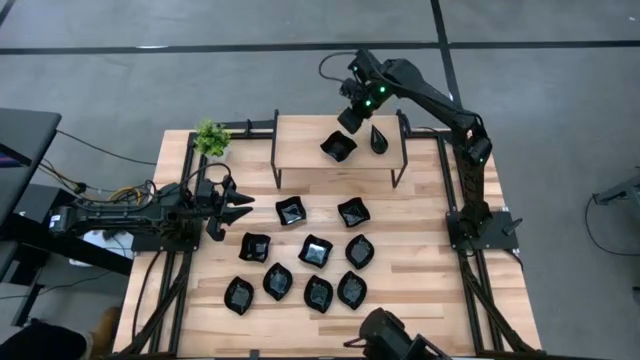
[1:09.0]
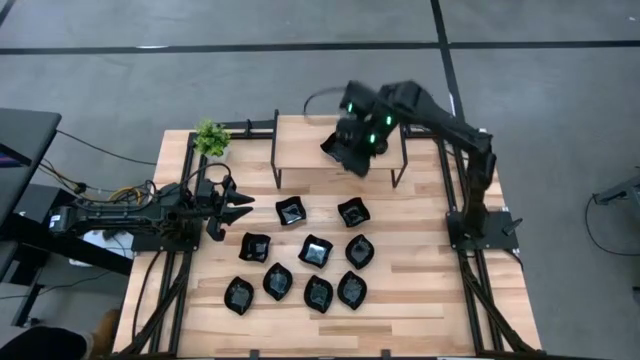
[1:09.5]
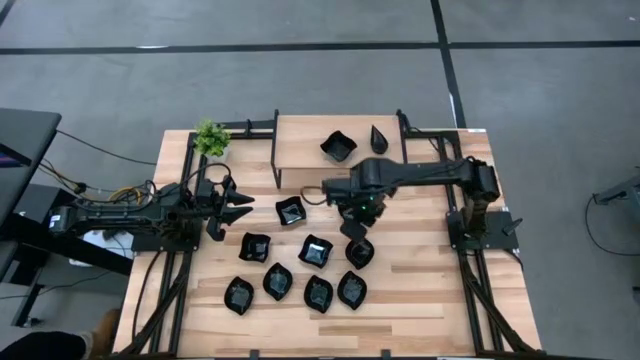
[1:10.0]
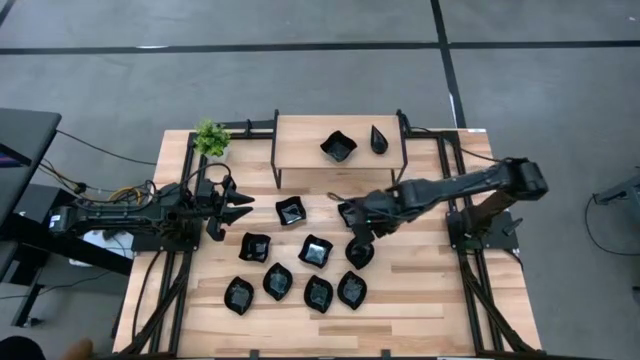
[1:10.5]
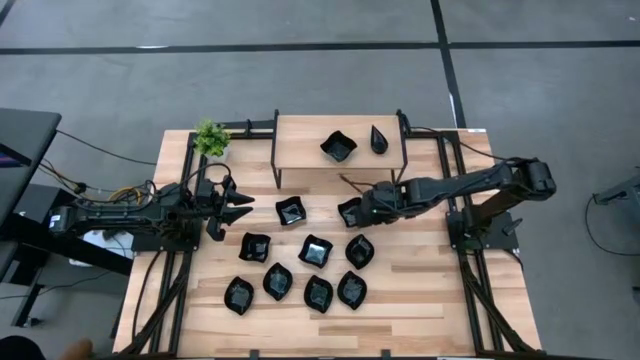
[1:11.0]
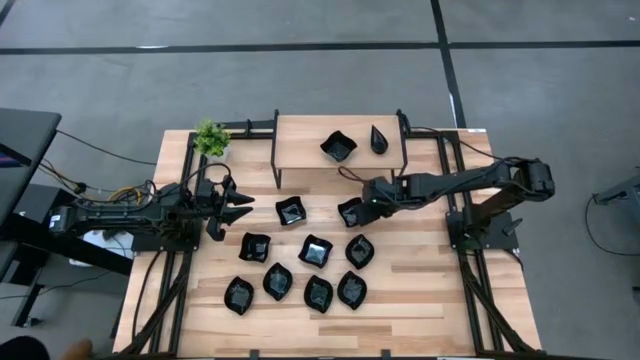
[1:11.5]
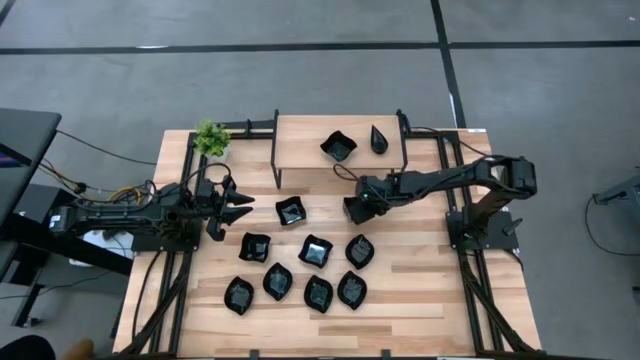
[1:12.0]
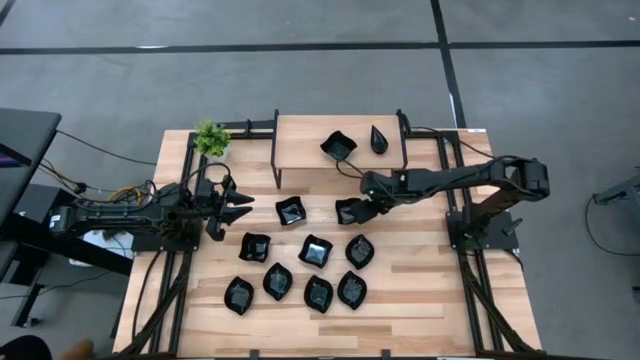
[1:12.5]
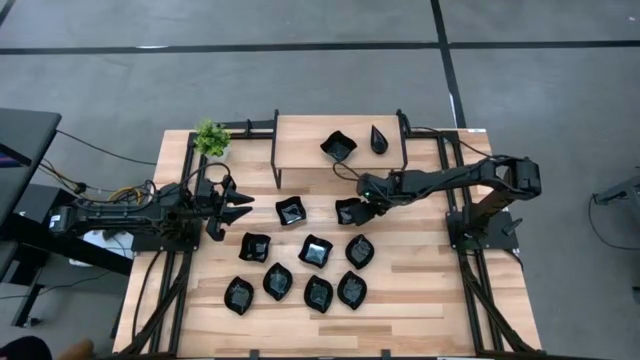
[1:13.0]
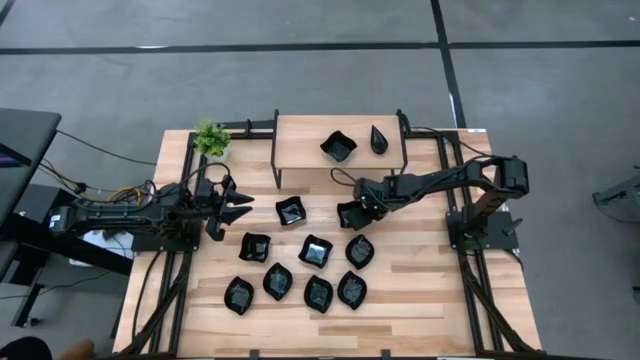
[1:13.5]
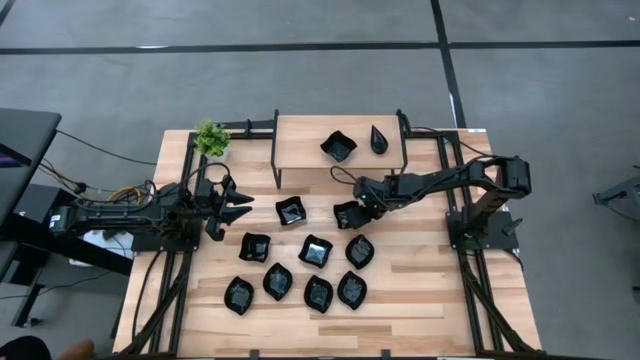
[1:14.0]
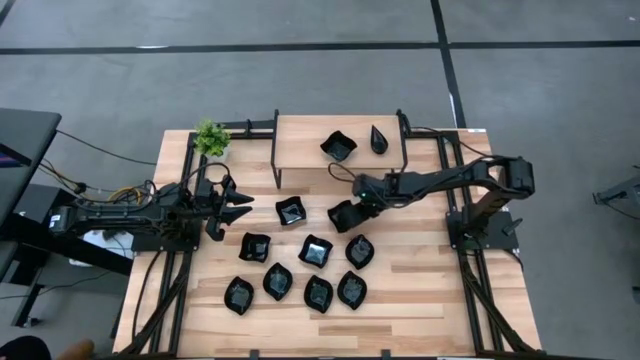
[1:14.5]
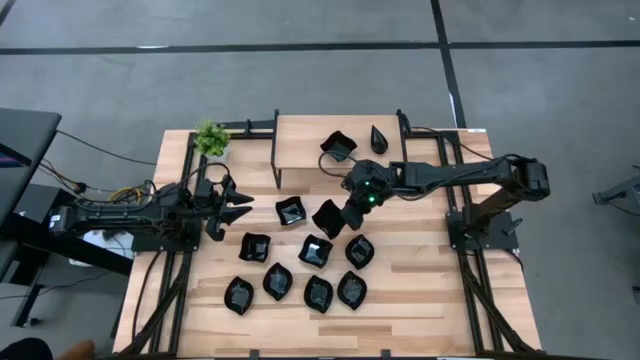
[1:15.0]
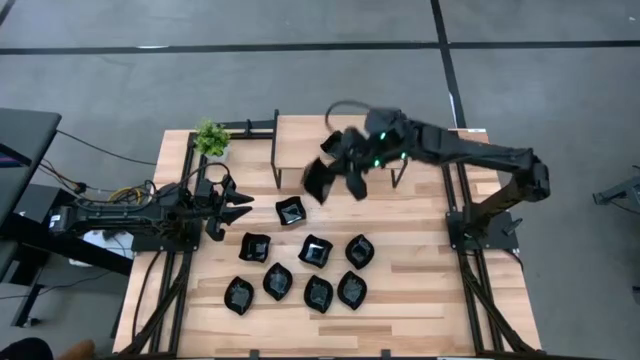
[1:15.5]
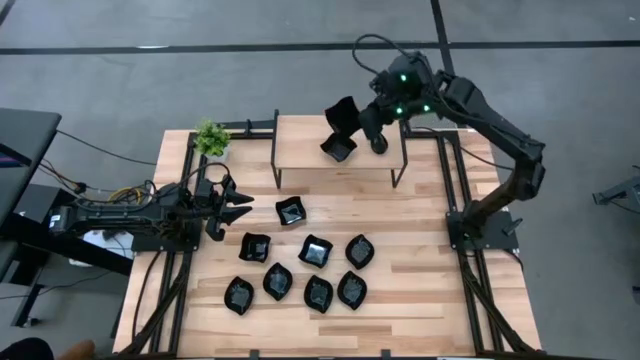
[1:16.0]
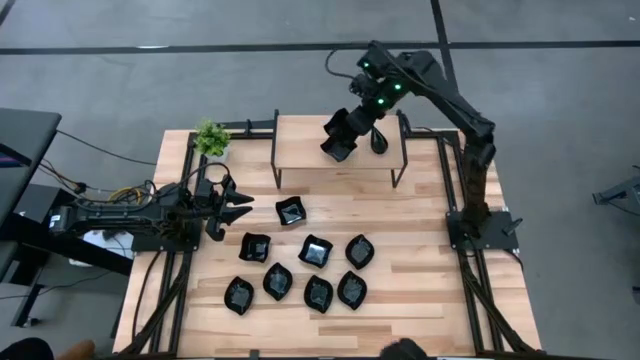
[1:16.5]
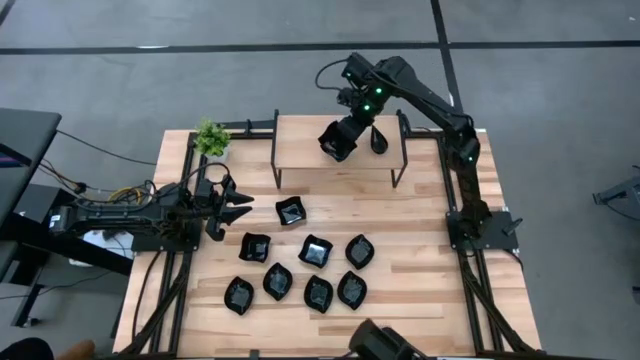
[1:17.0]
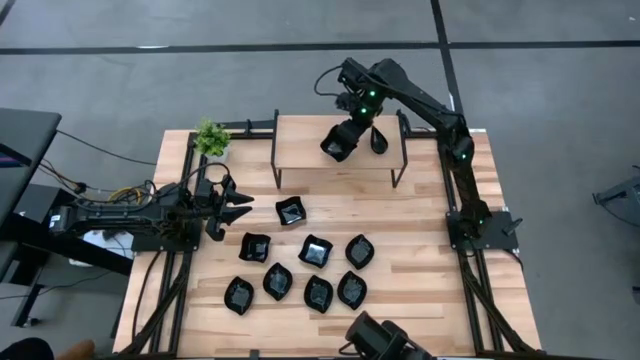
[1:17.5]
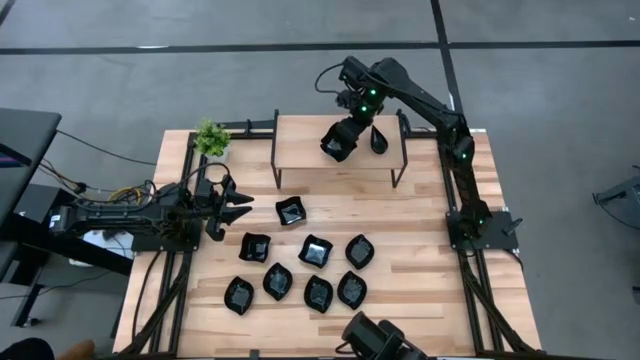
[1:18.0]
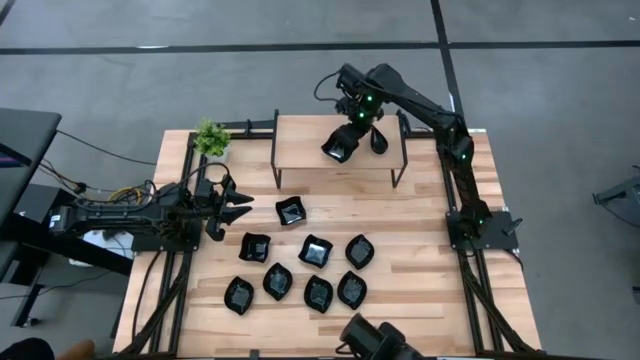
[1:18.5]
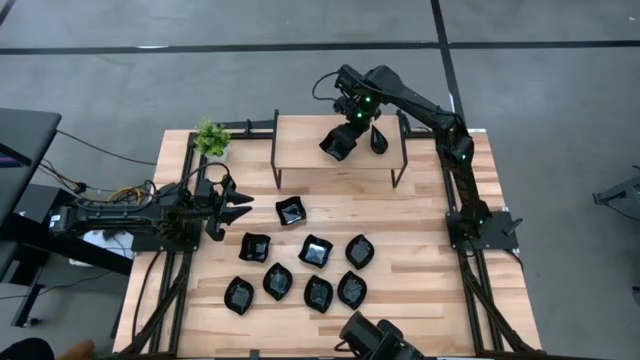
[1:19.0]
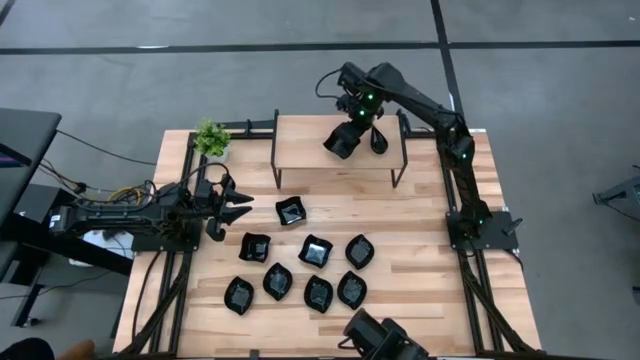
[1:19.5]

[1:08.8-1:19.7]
Task: Pick & Place Mini shaped plates
Stack the distorted square plate on top of the other distorted square plate on the shelf

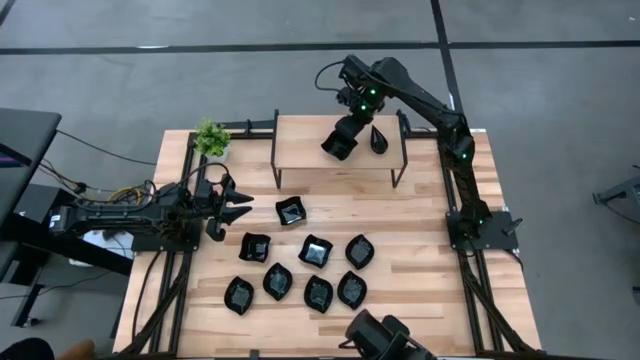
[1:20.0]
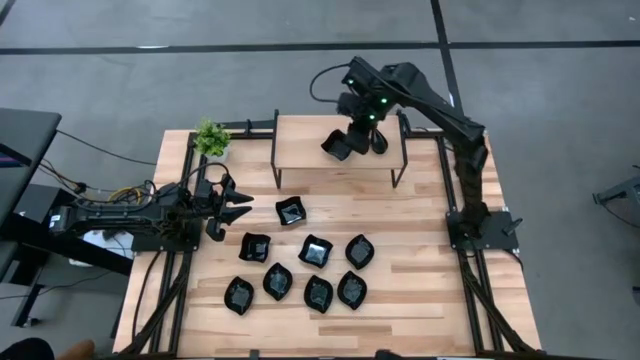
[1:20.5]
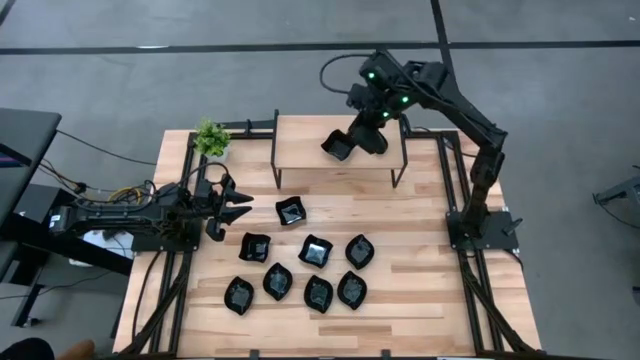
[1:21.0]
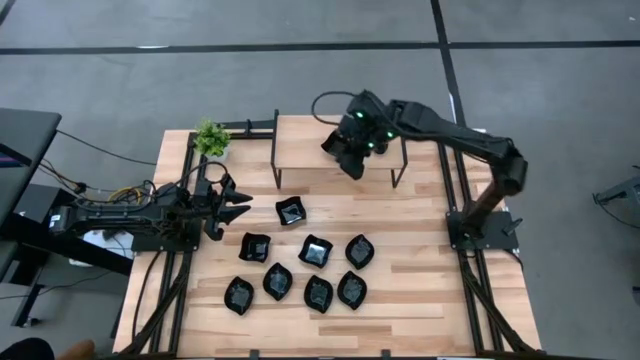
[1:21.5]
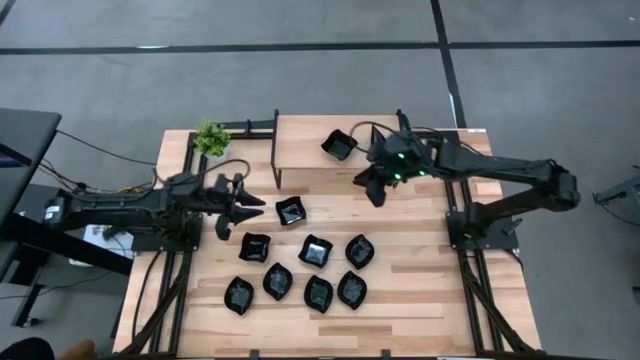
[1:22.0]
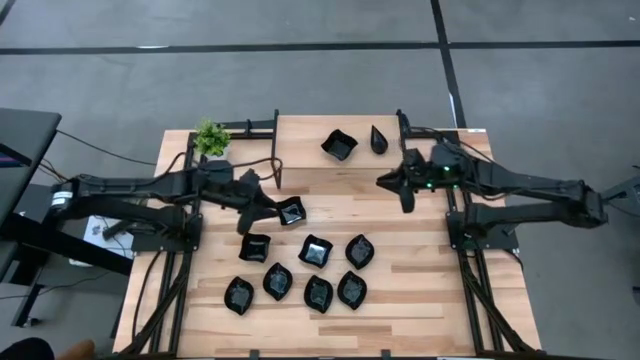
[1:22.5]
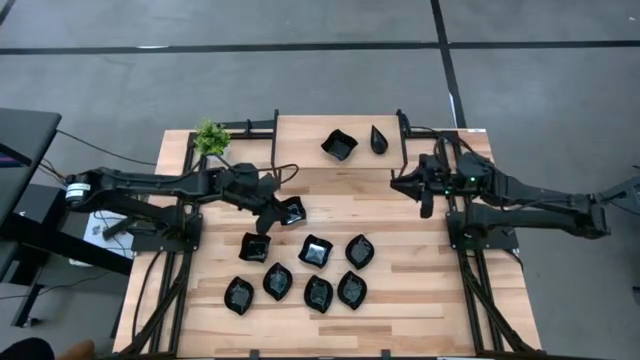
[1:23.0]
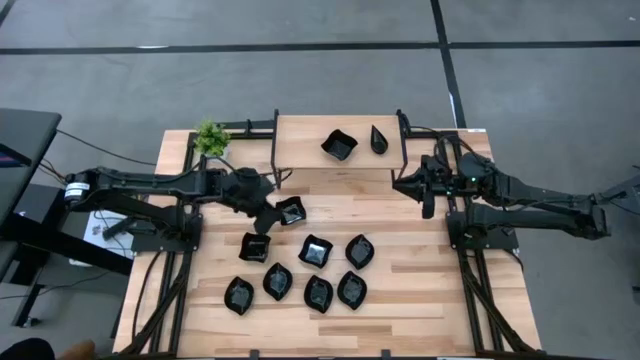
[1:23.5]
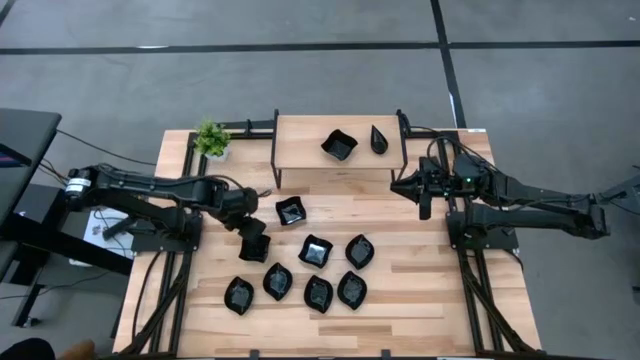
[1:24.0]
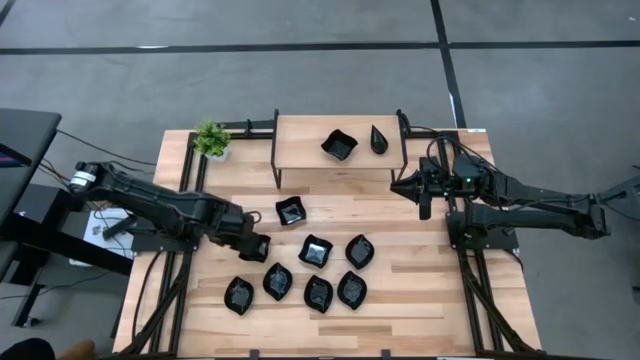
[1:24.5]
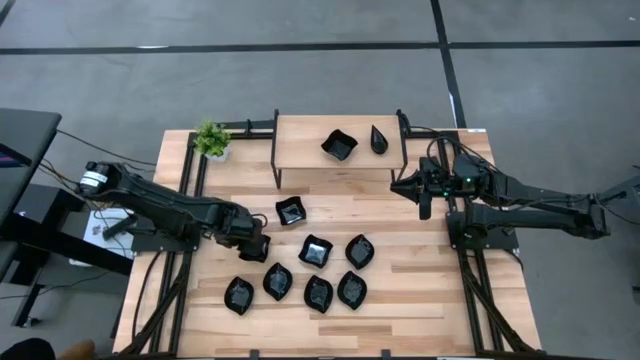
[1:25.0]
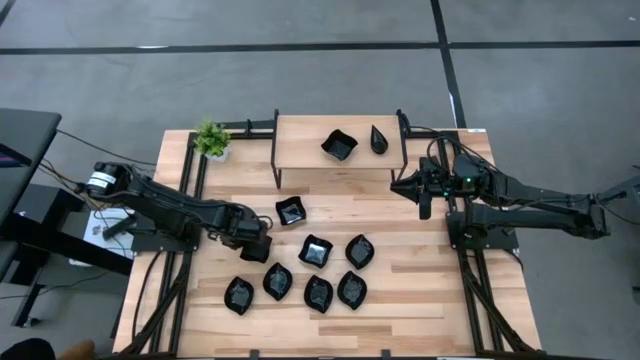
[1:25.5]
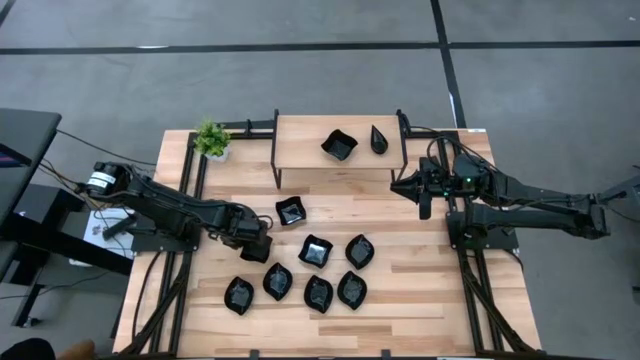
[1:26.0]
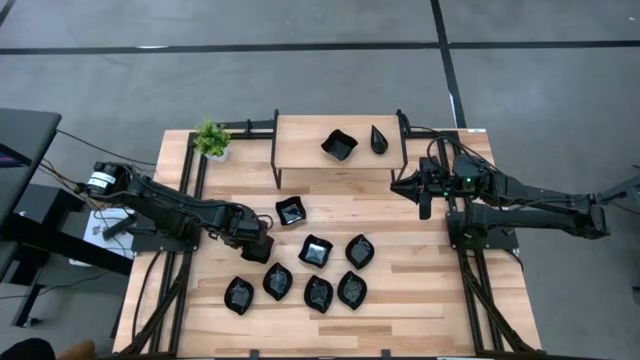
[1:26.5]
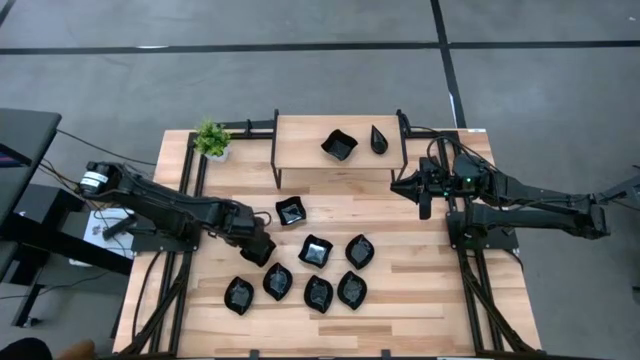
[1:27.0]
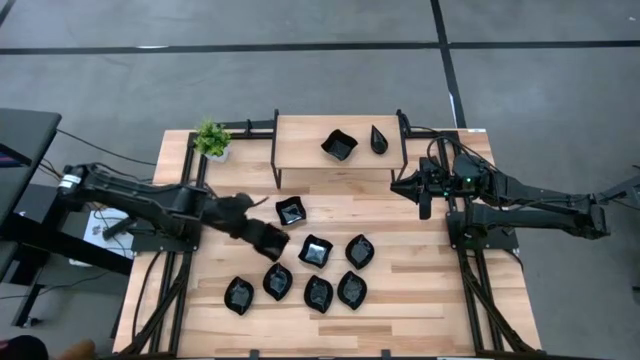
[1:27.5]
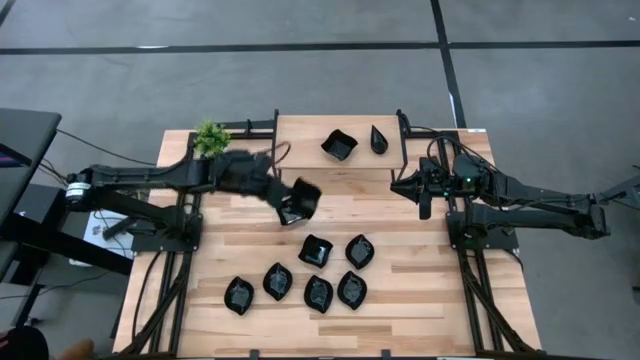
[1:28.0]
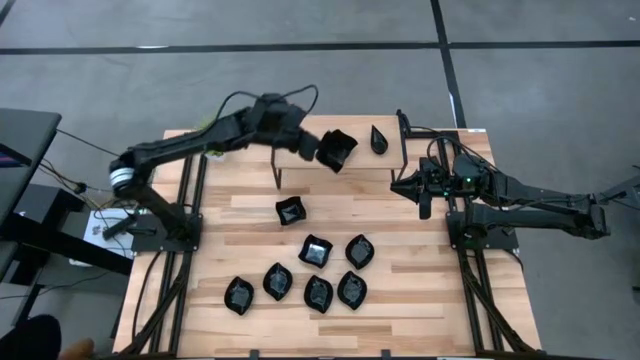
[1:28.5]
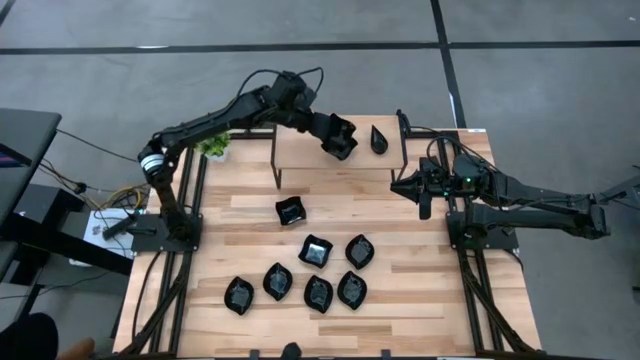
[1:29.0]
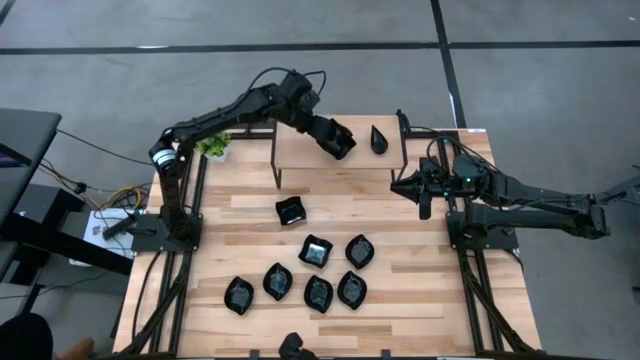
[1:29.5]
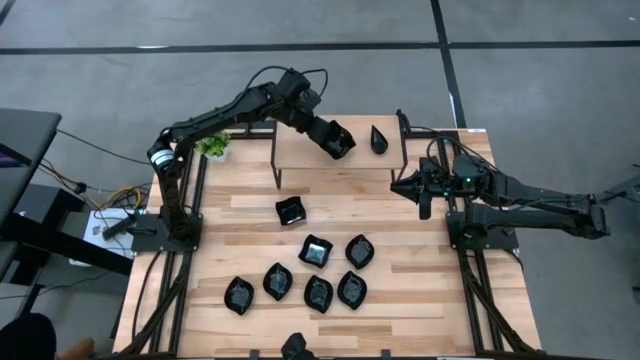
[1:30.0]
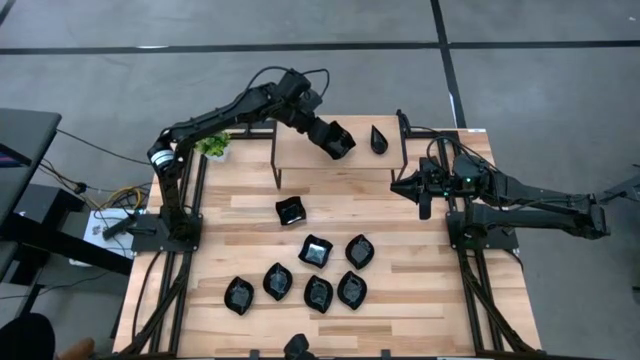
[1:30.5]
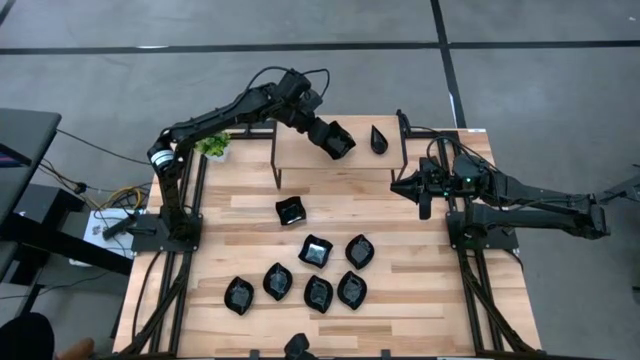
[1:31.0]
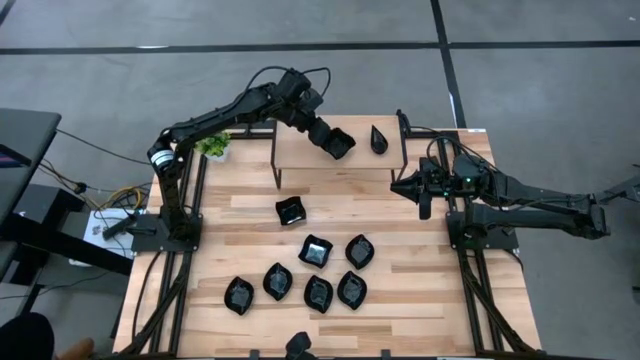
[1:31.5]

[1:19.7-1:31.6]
Stack the distorted square plate on top of the other distorted square plate on the shelf
